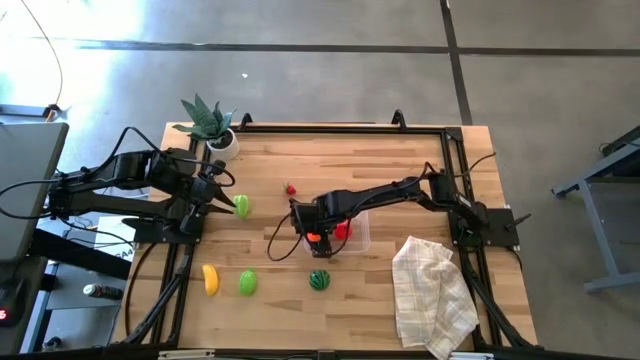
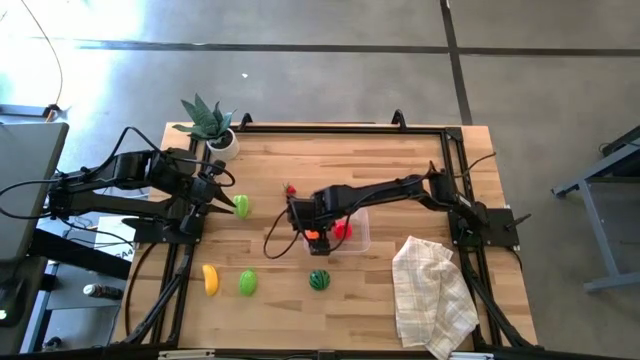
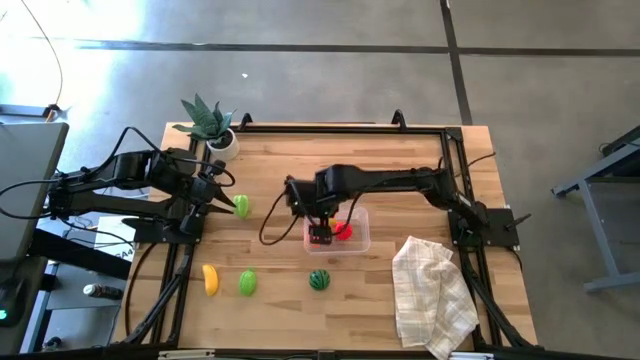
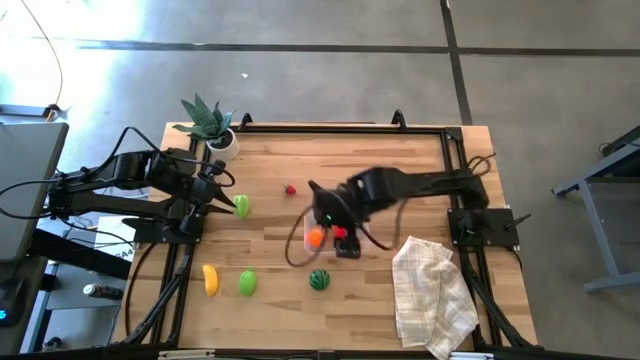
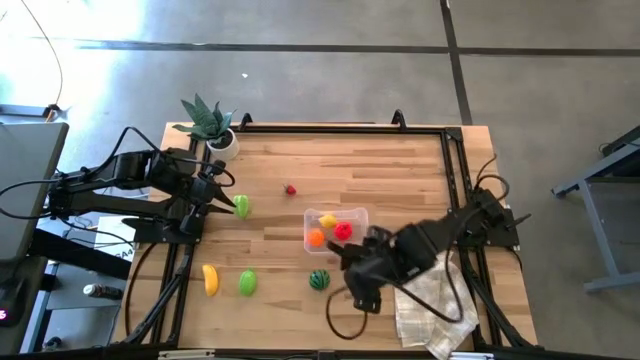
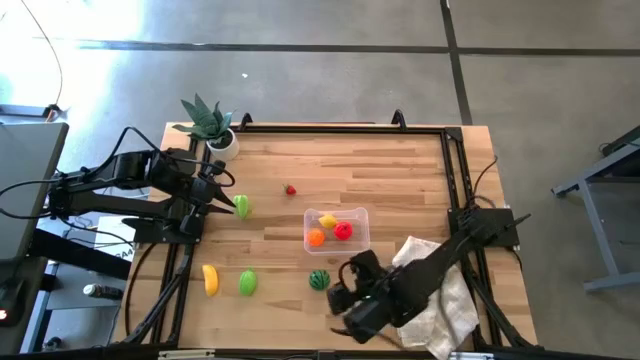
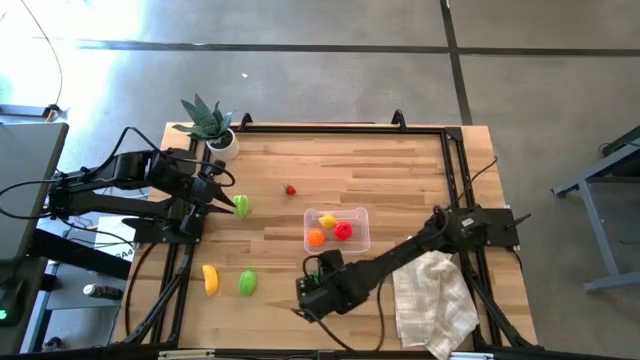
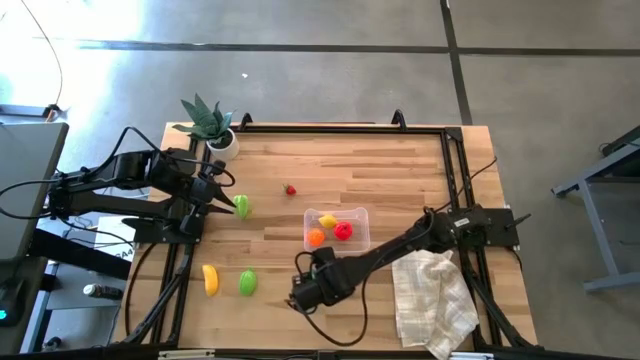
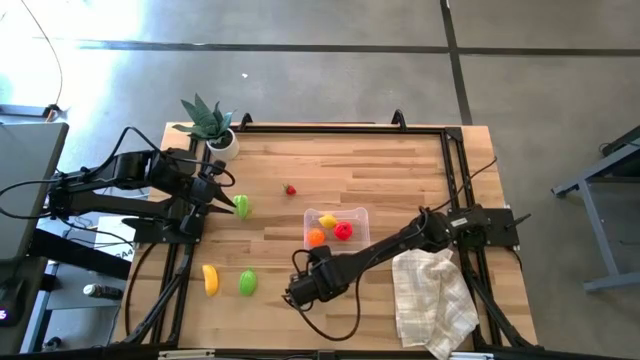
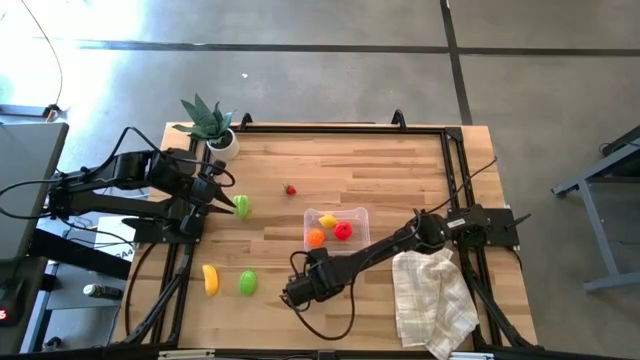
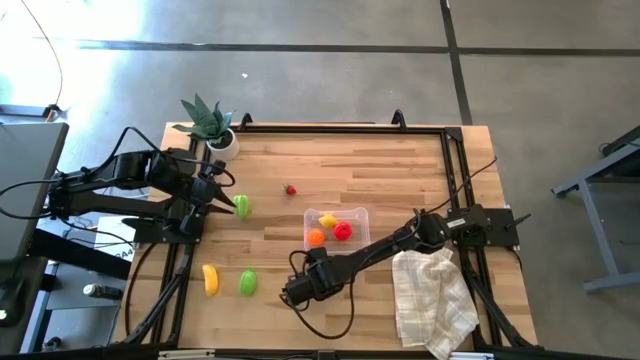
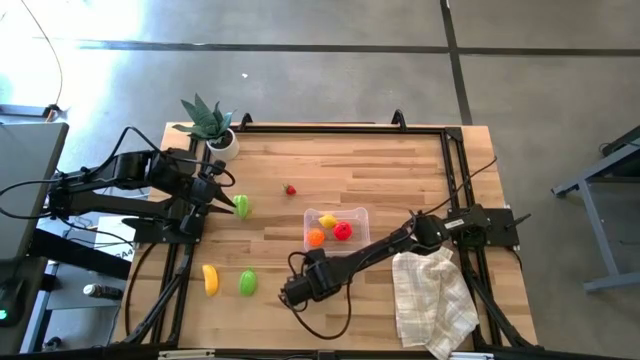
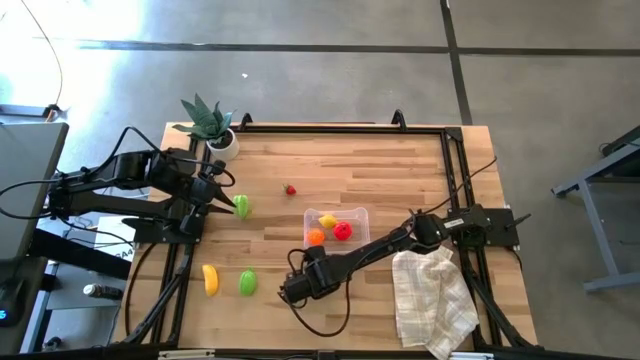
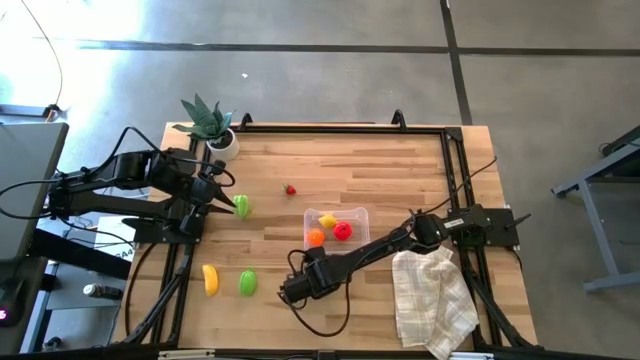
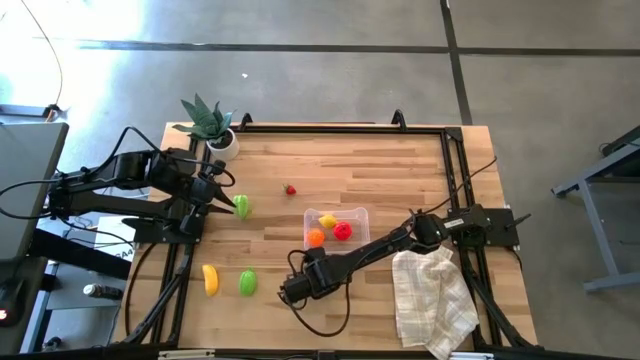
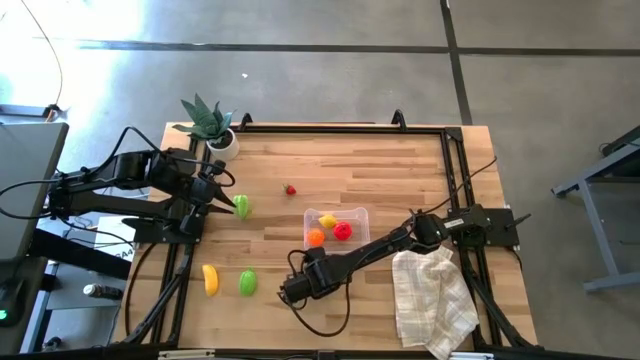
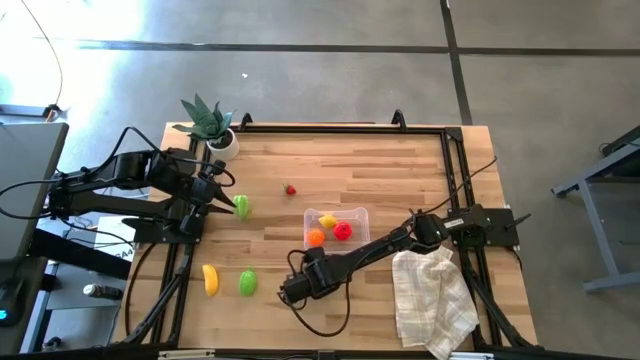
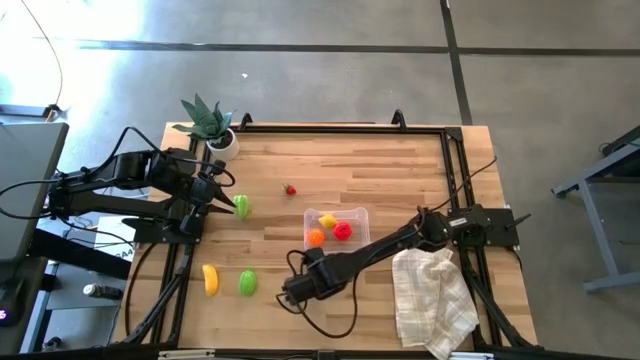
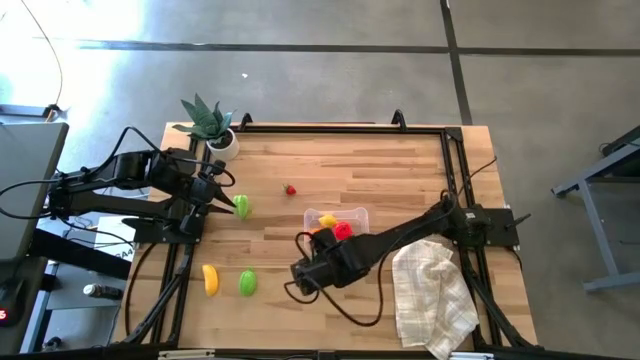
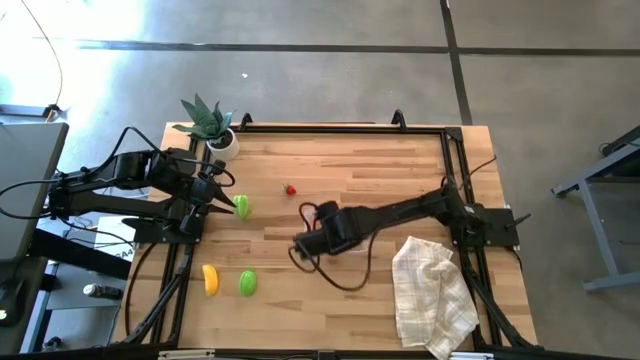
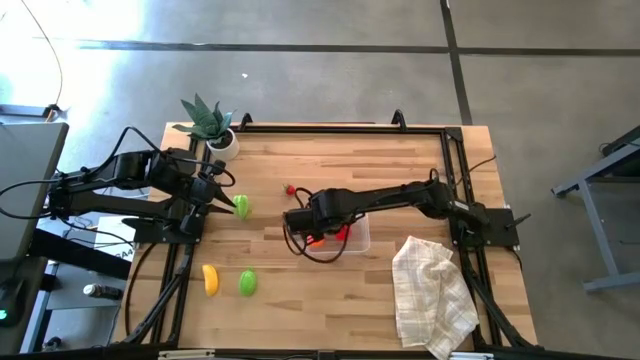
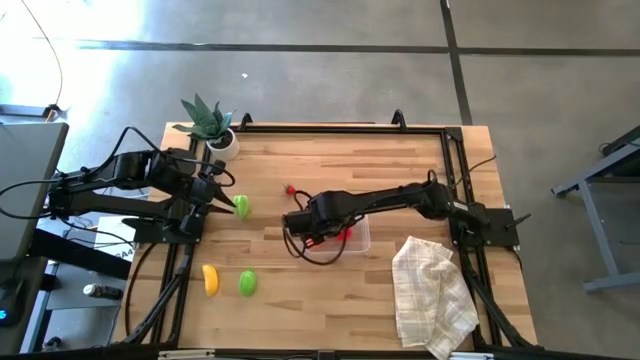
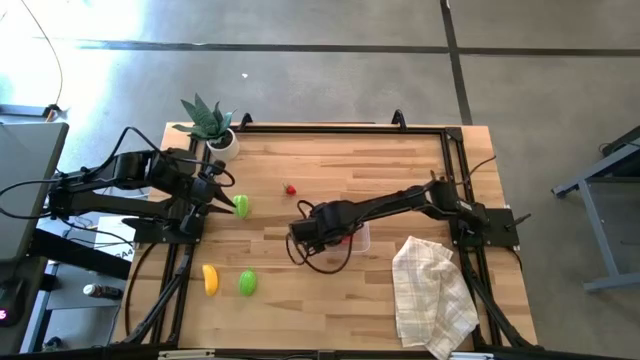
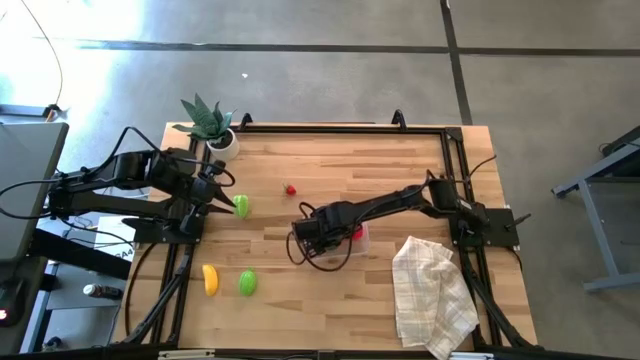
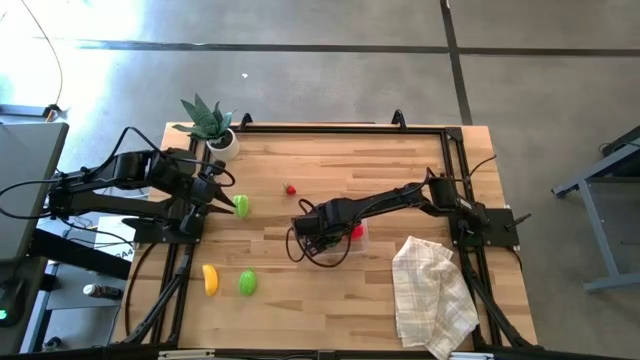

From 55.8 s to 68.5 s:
Task: Pick and placing Produce into tupperware
Put the green watermelon into the transparent bin

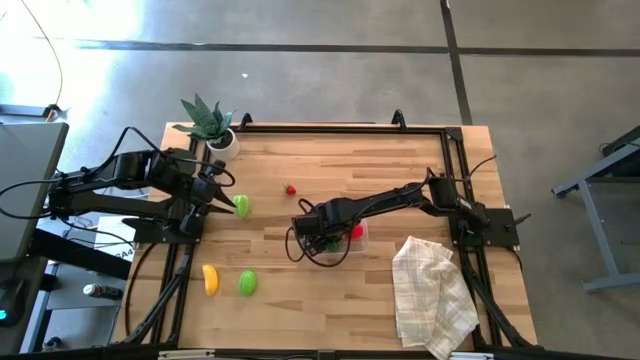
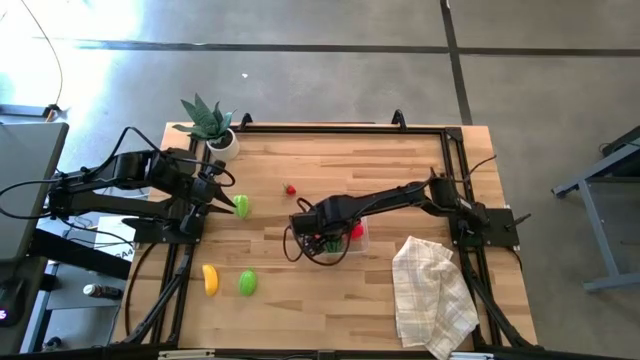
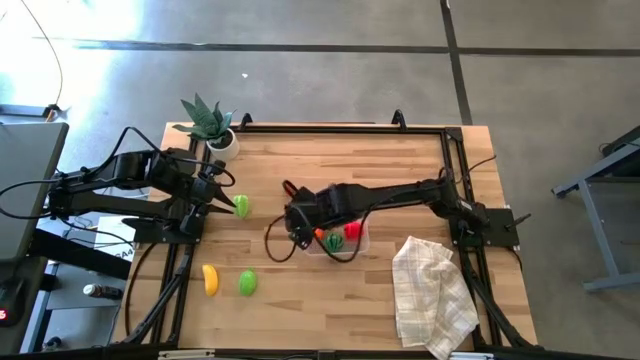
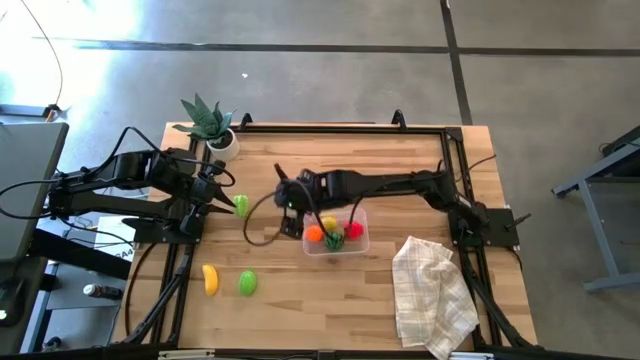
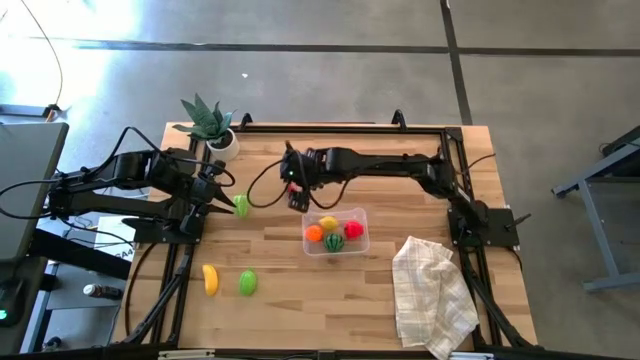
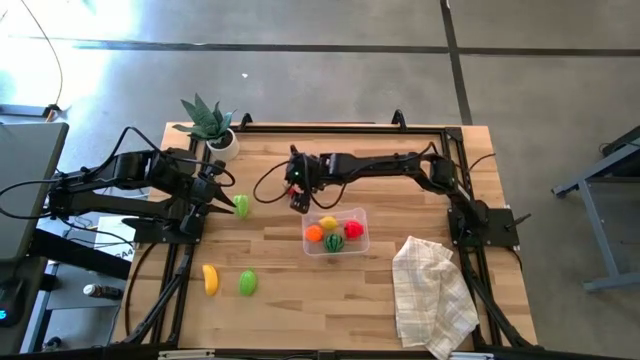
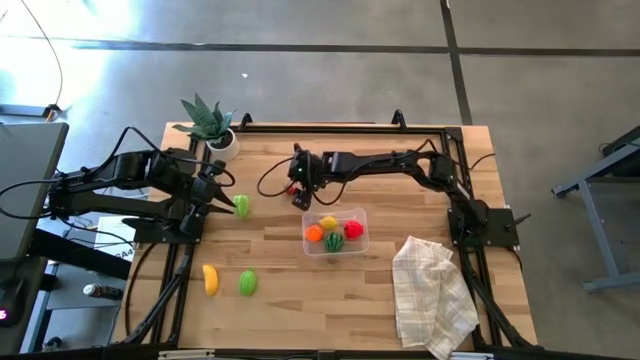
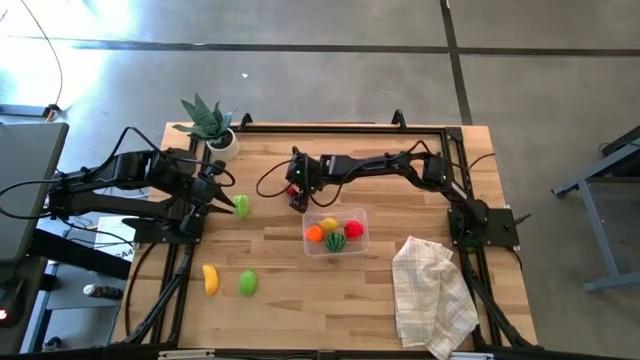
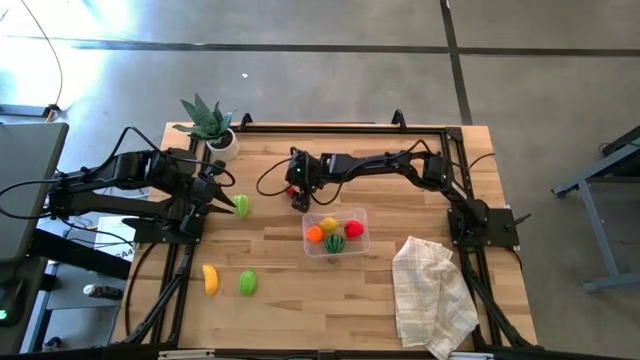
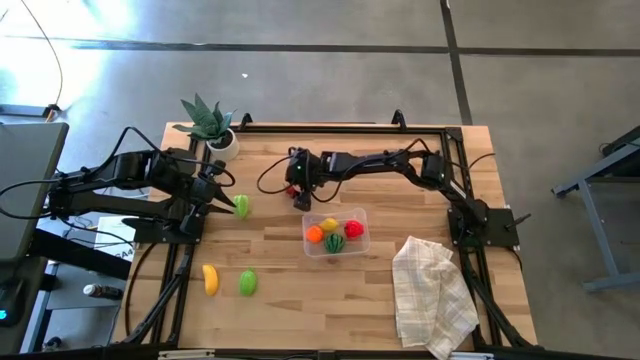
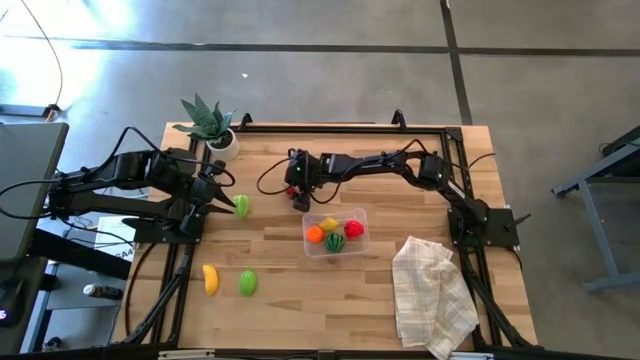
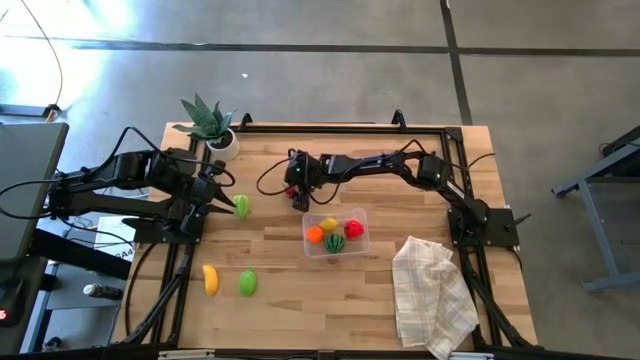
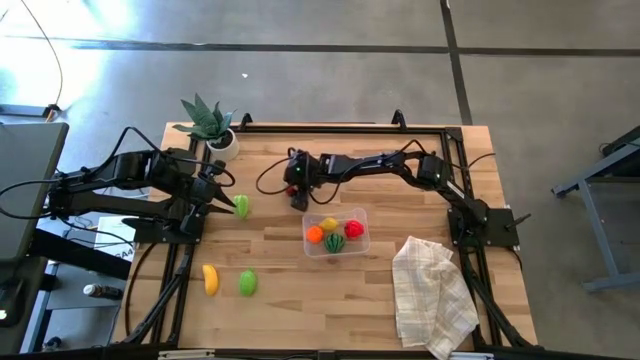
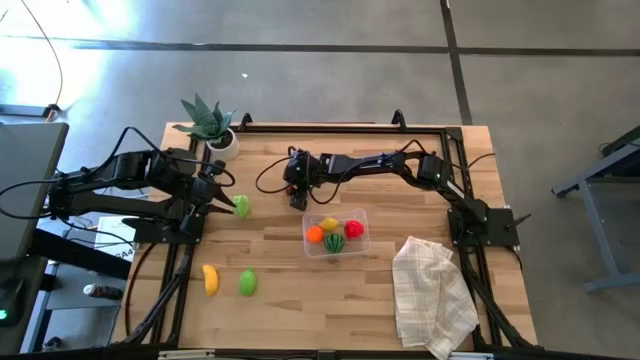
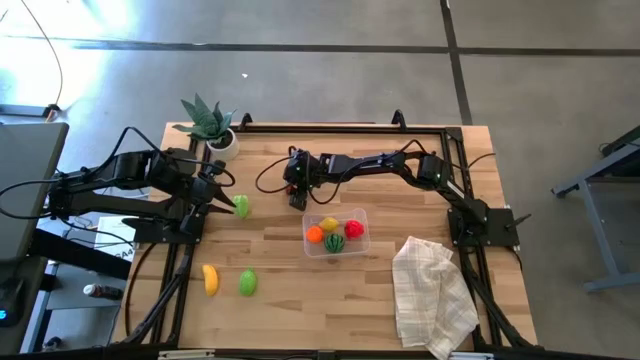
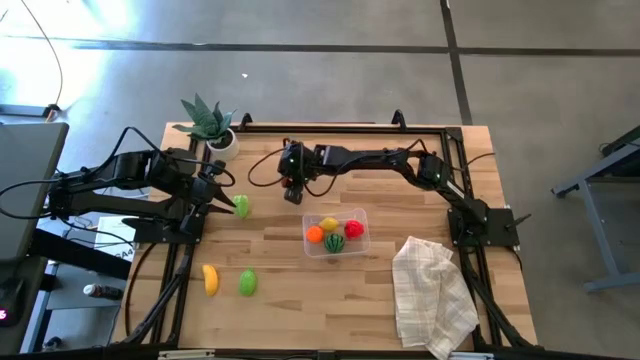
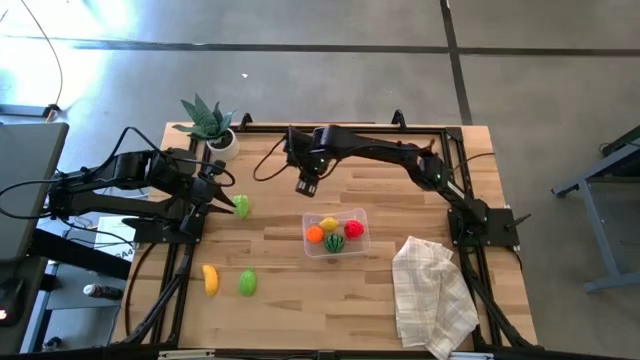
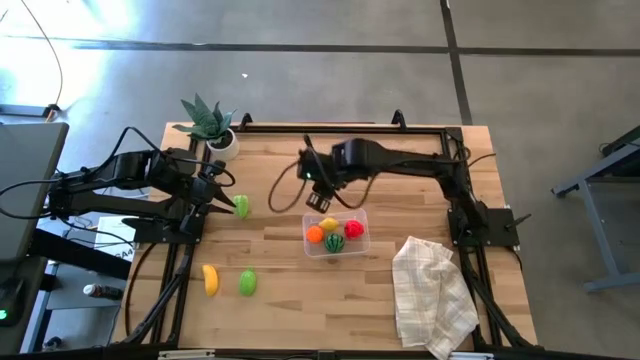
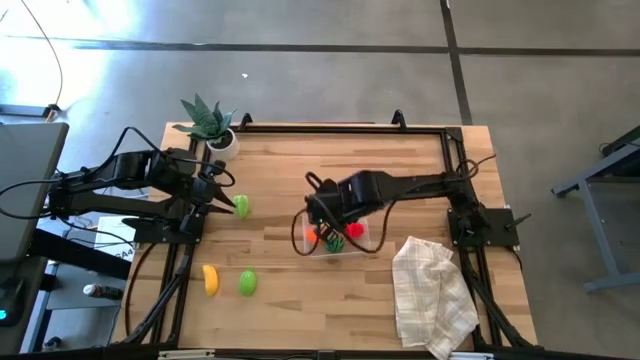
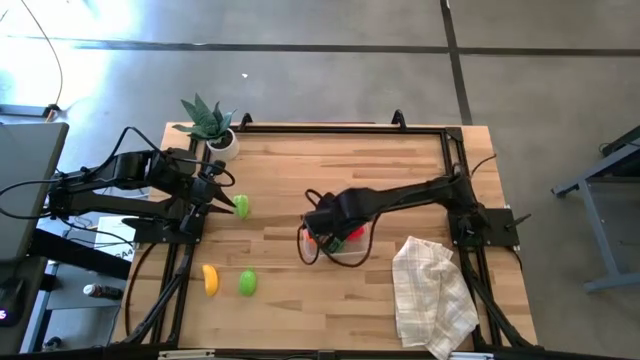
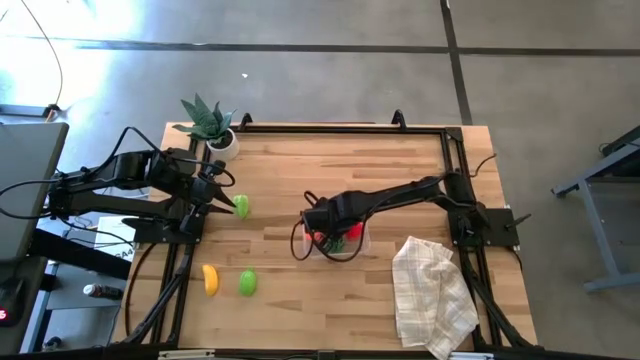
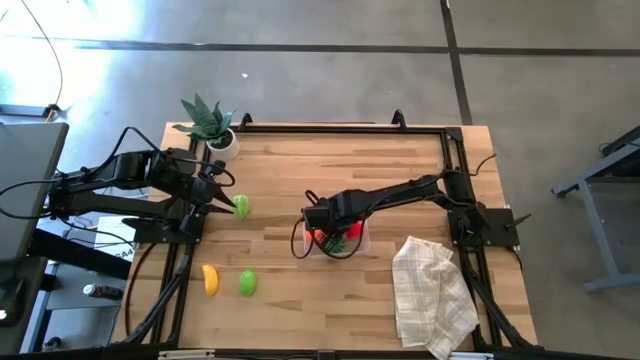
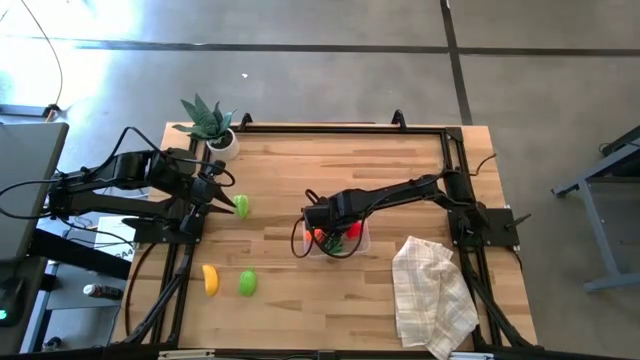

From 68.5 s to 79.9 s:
Put the red strawberry into the transparent bin
